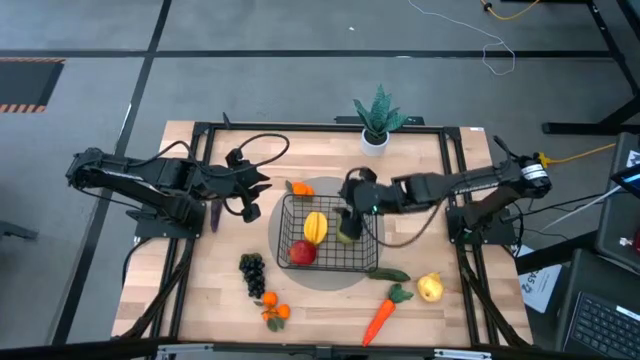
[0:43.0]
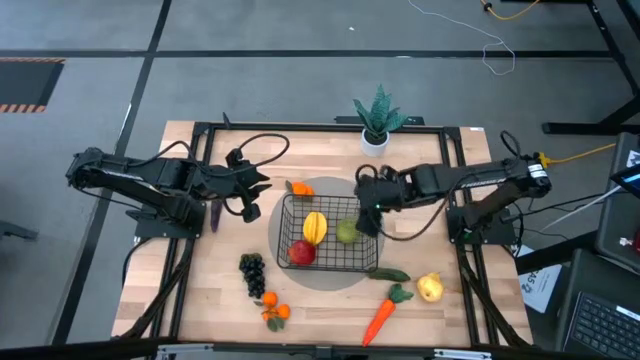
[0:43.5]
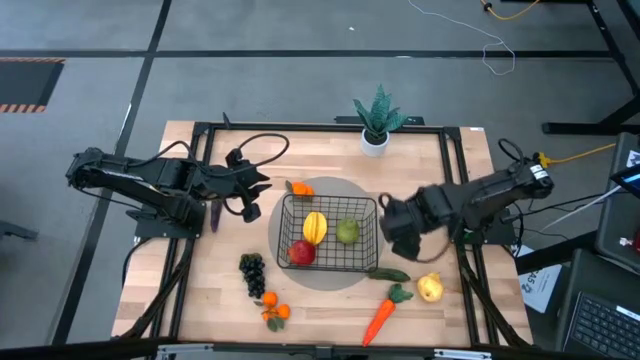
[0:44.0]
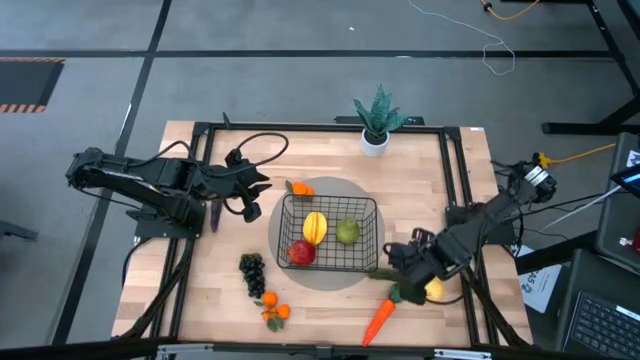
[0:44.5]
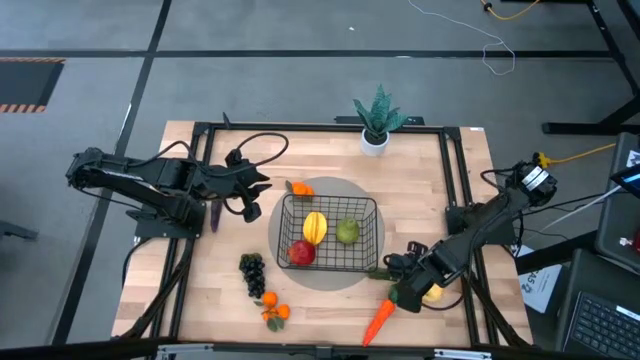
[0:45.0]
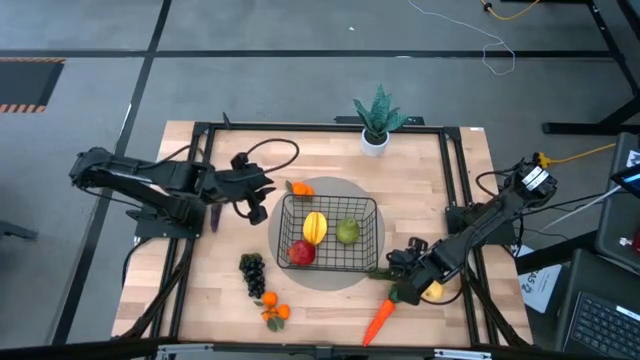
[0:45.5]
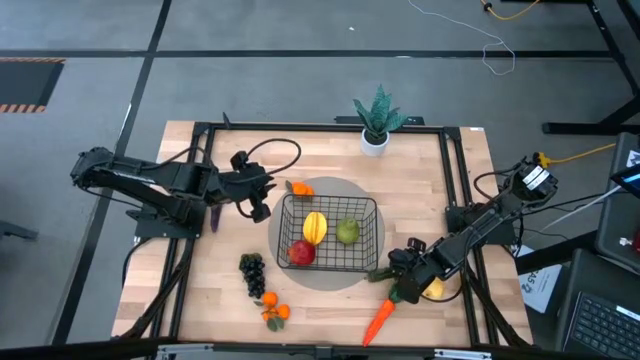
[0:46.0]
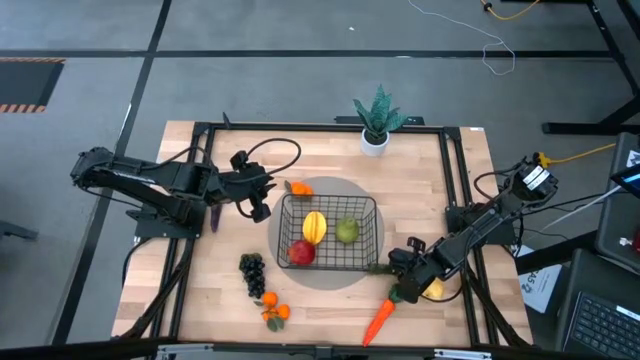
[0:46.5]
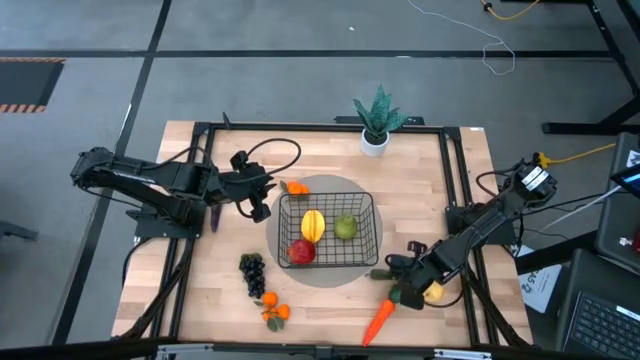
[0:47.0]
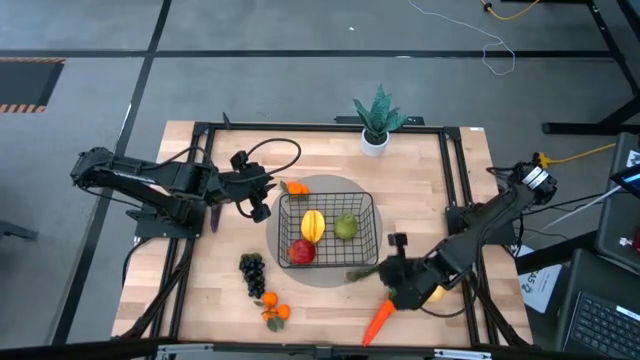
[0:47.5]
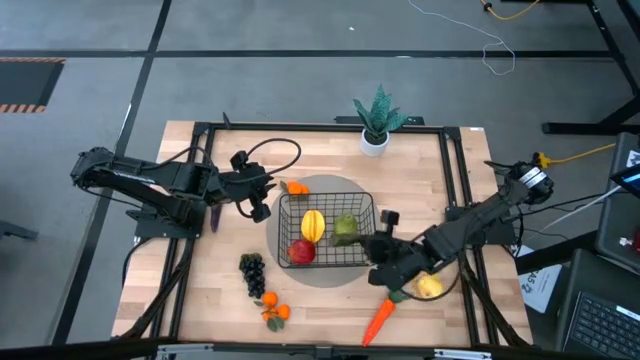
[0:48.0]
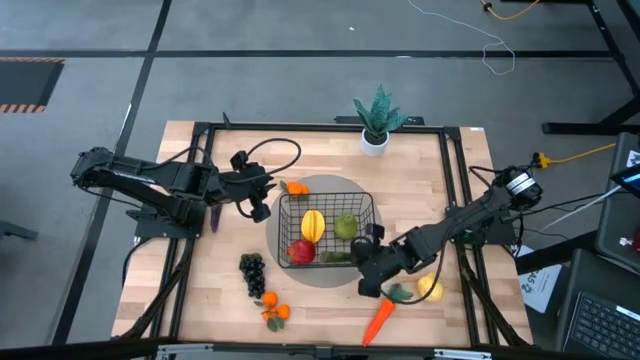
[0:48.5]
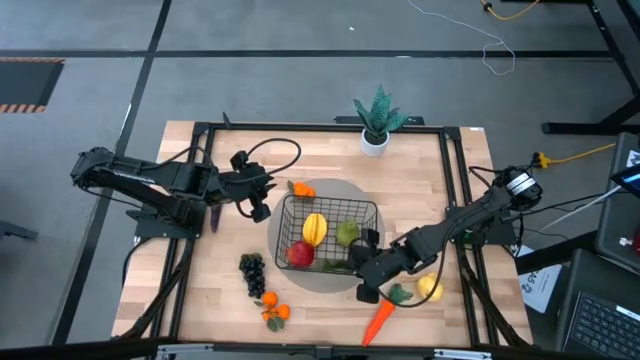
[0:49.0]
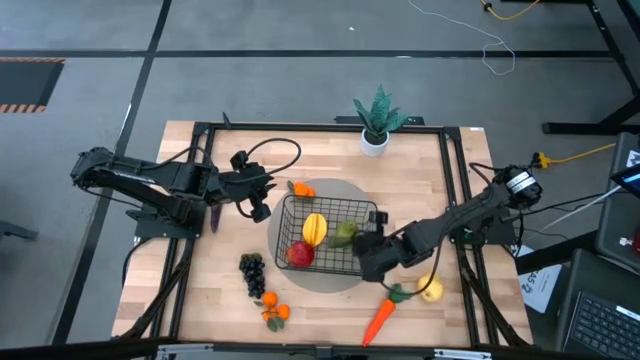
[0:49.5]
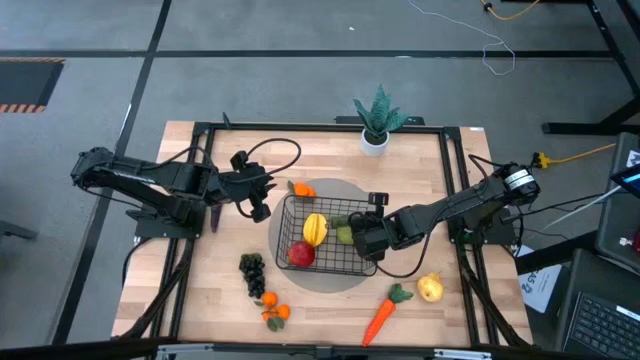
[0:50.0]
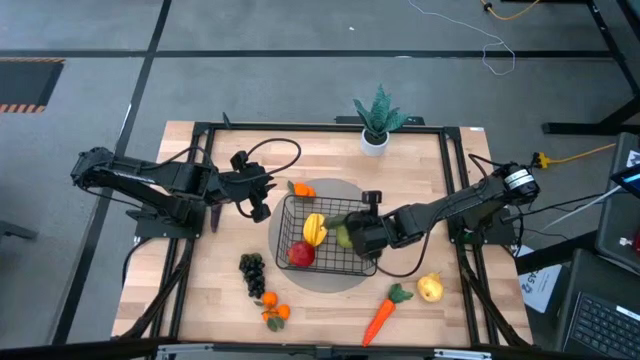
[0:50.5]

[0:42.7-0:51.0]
Task: Build produce basket
Put the green chili pepper into the black wire basket

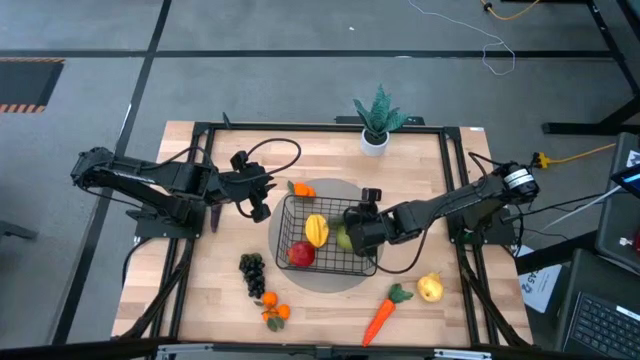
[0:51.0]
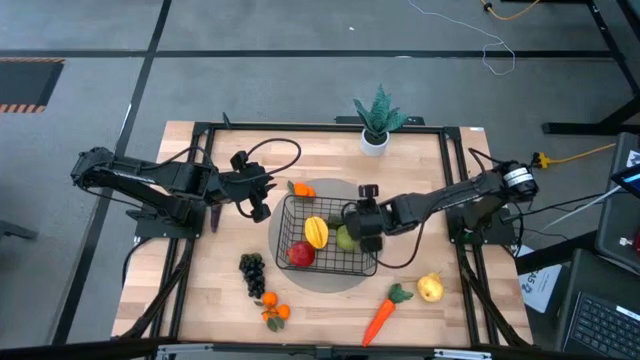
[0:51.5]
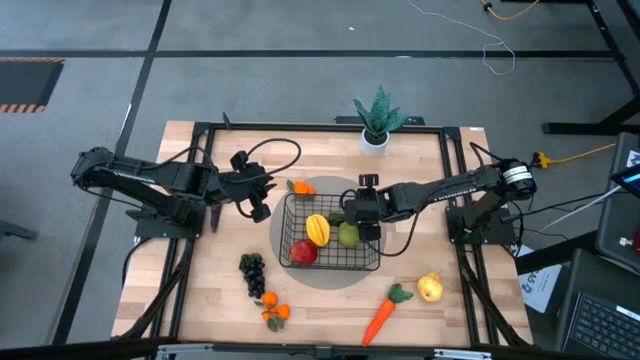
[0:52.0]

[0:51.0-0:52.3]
Adjust the black wire basket

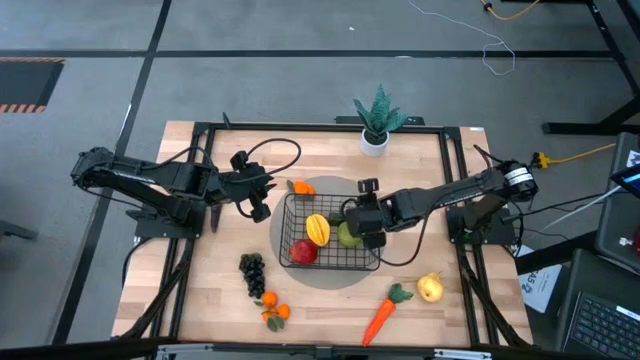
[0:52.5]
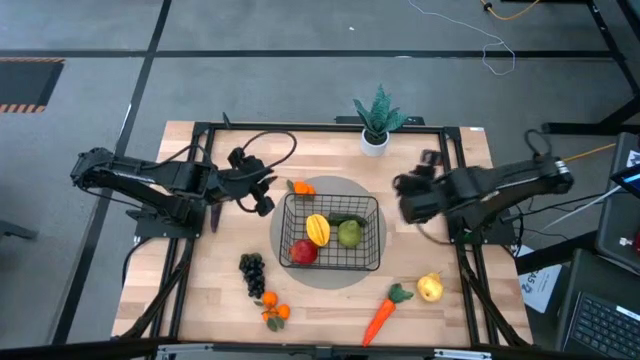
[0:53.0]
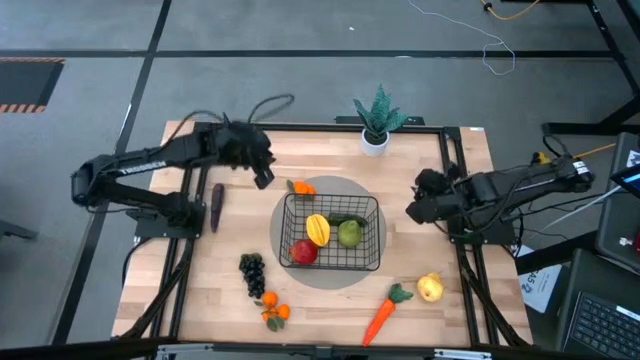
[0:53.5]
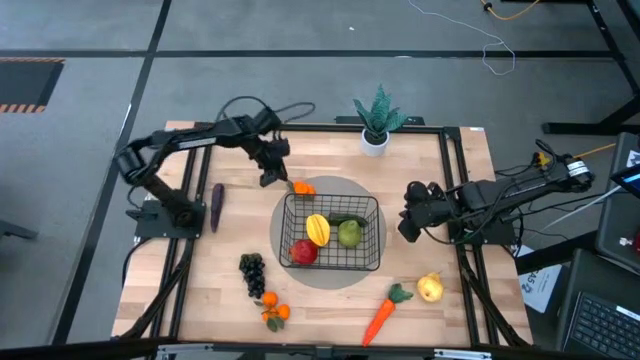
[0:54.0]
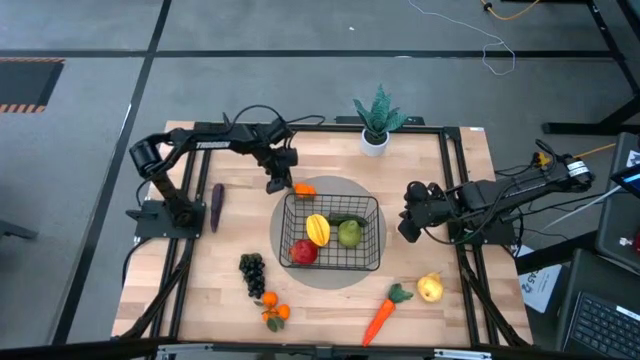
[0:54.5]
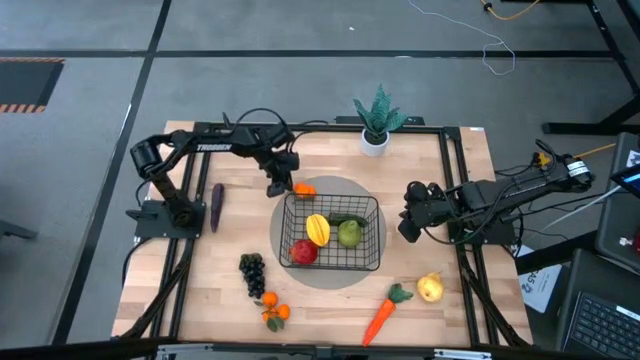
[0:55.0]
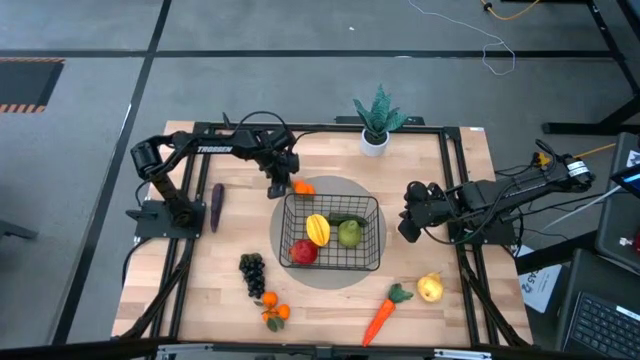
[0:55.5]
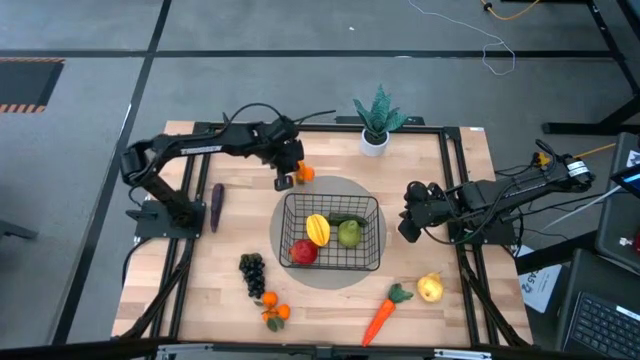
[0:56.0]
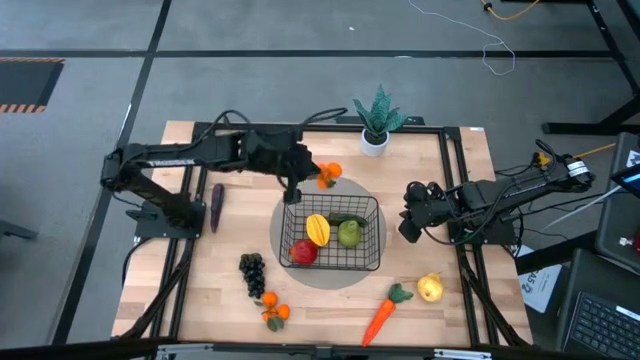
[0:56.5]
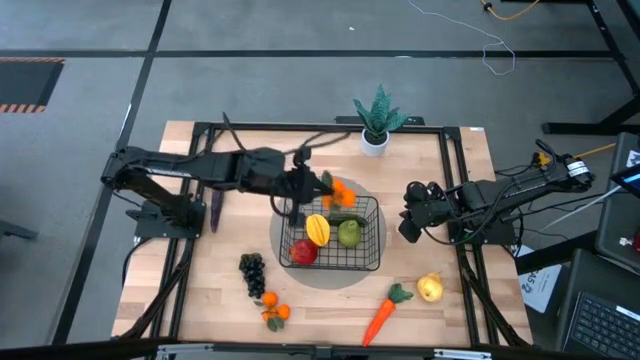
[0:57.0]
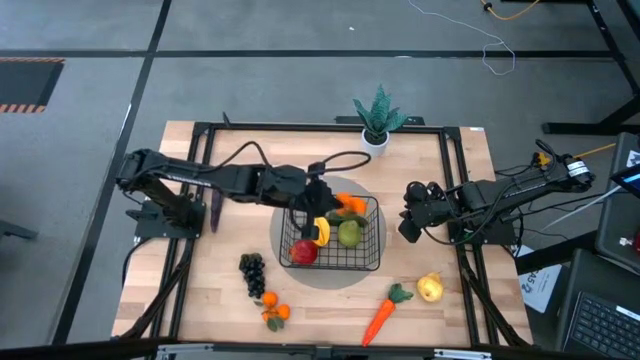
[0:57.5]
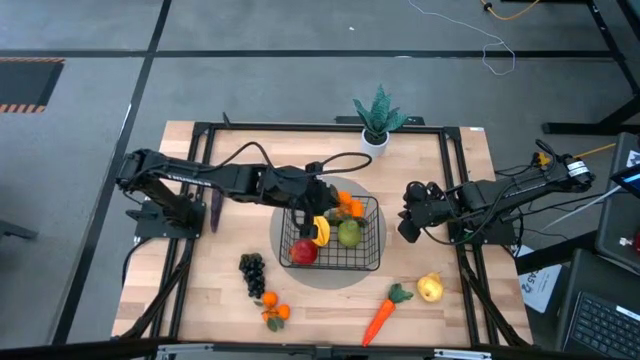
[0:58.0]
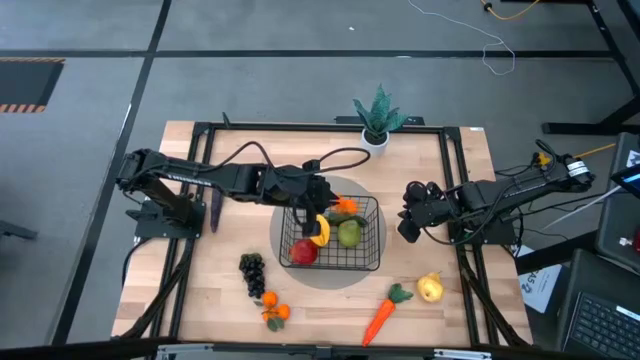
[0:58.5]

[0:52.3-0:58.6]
Put the top tangerines into the black wire basket

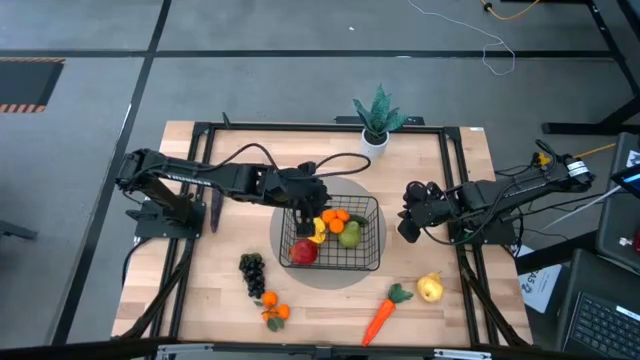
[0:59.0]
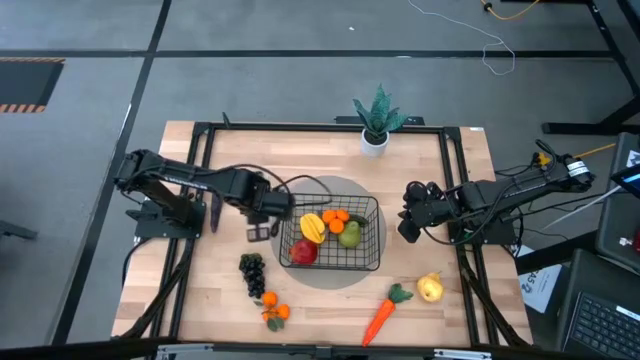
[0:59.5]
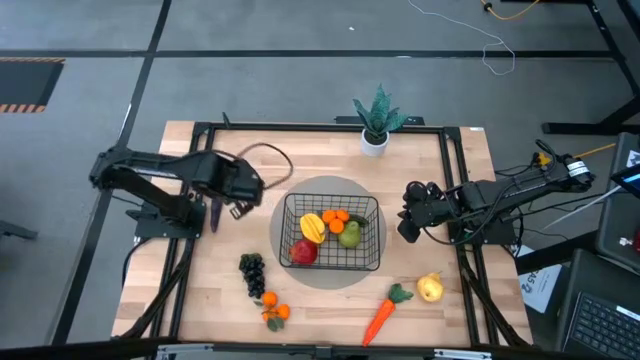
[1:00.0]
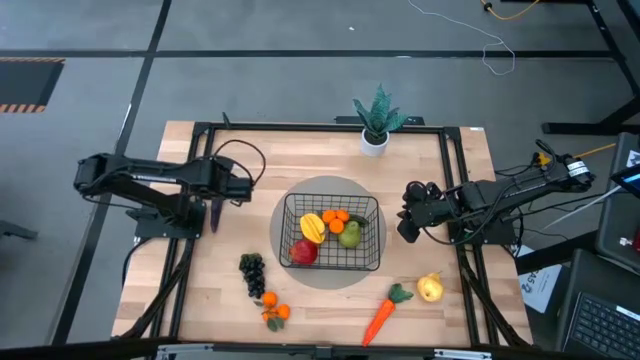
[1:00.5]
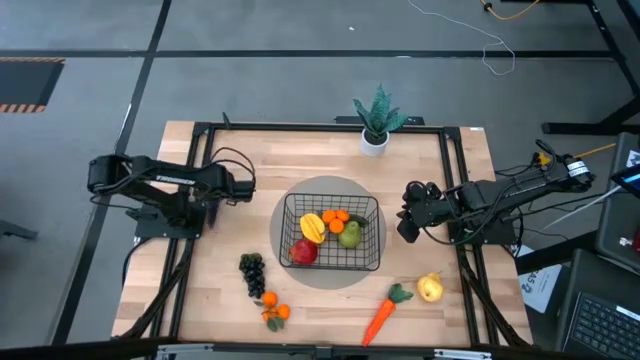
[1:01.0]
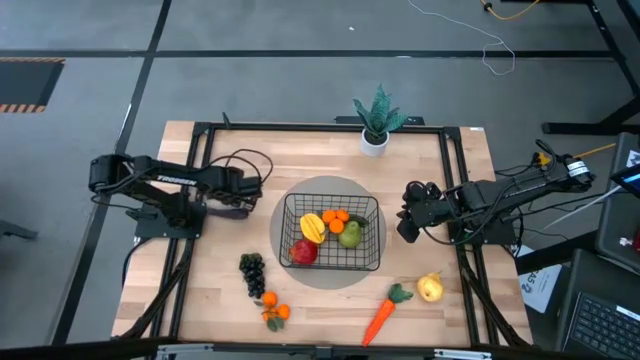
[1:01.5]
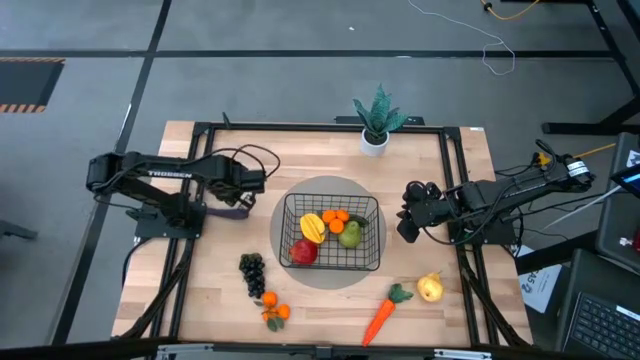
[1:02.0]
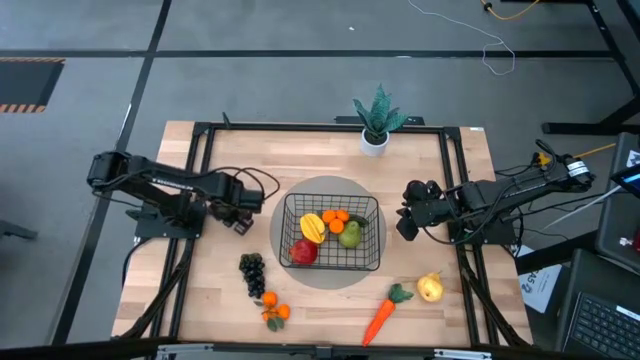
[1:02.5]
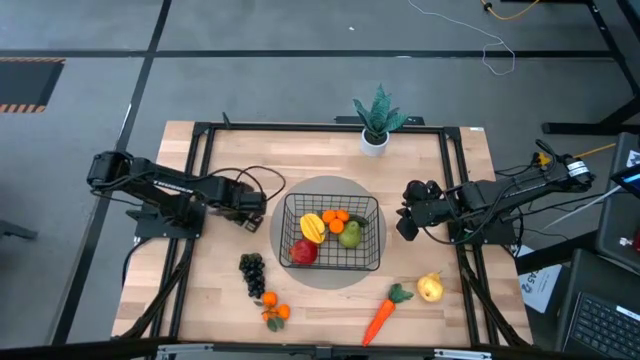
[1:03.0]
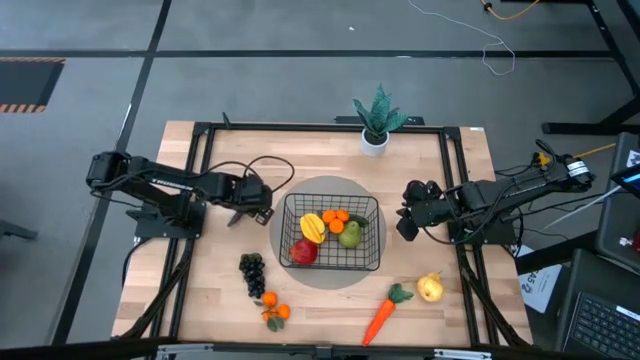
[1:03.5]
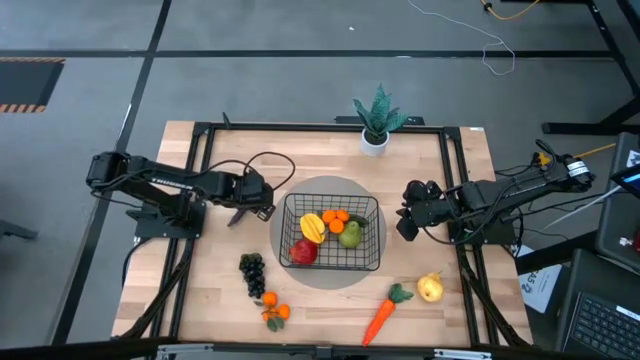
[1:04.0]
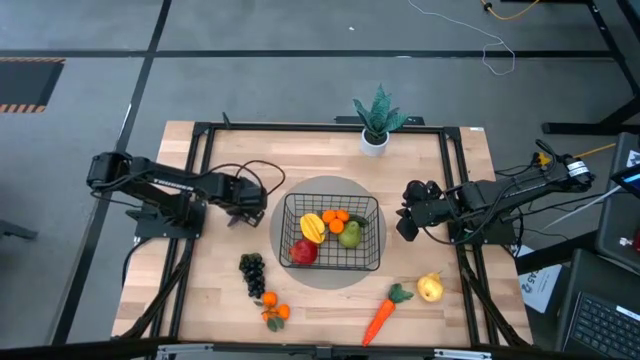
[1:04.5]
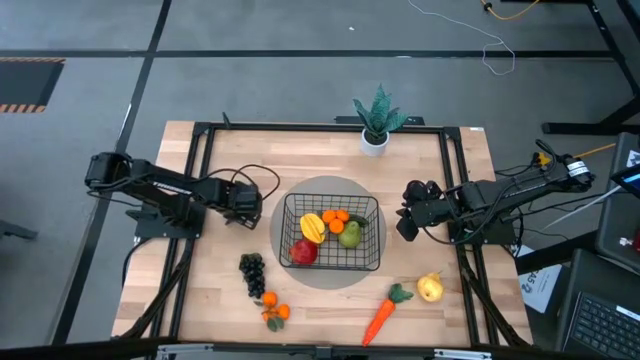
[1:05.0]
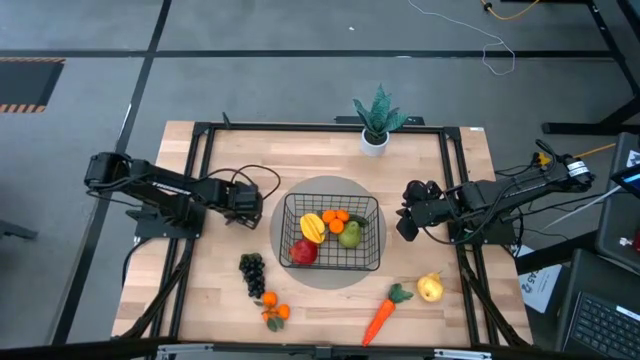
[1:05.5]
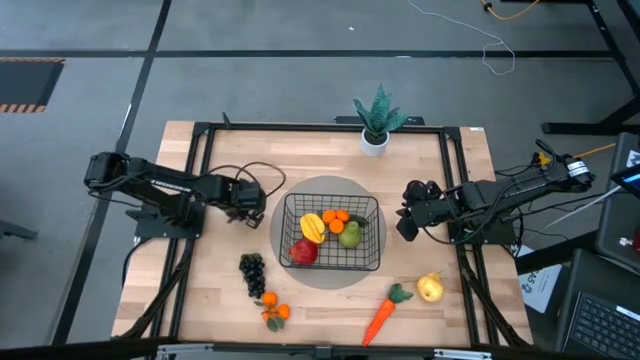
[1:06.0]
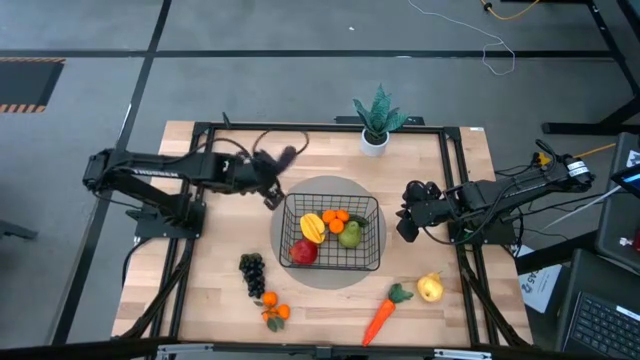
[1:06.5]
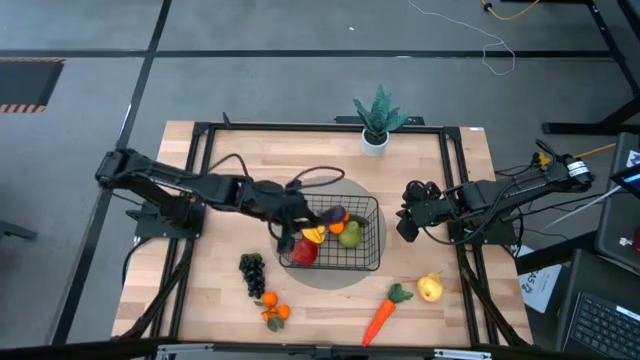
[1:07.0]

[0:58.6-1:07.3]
Put the eggplant into the black wire basket
